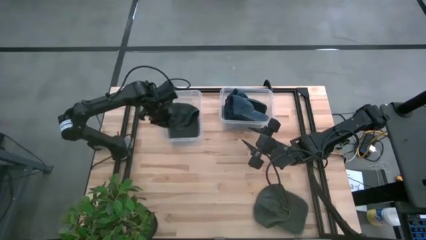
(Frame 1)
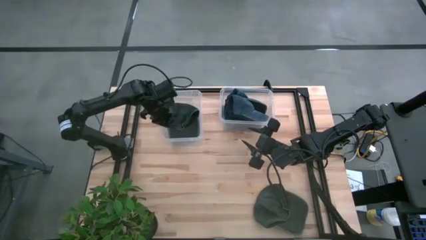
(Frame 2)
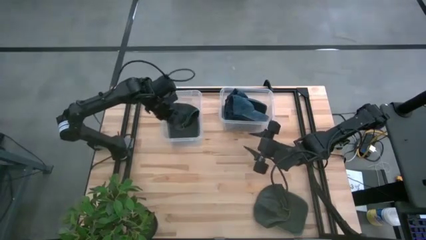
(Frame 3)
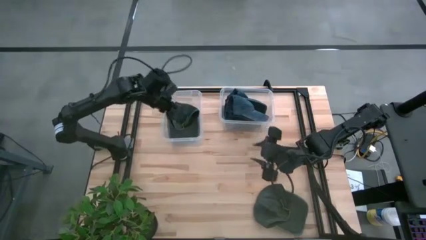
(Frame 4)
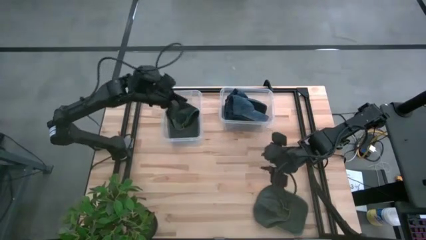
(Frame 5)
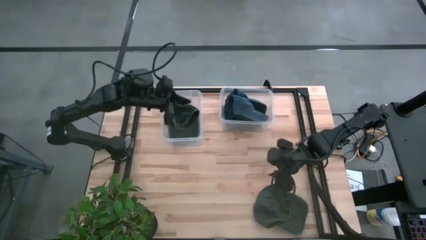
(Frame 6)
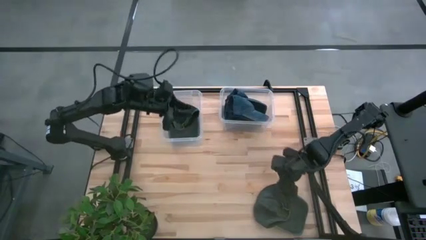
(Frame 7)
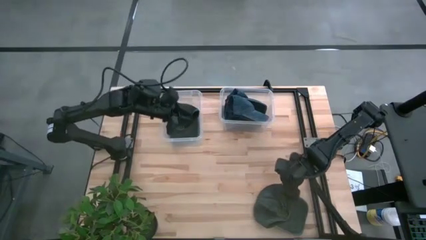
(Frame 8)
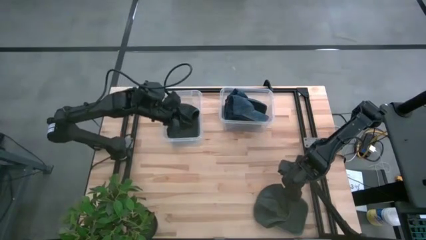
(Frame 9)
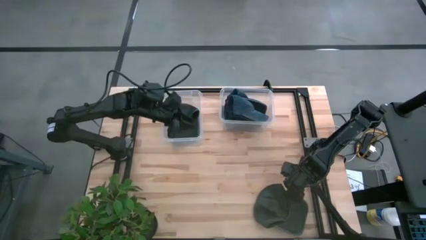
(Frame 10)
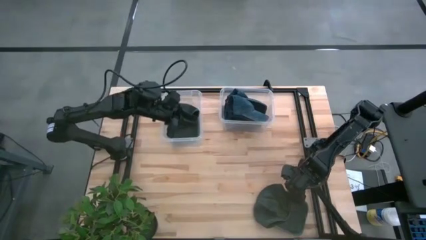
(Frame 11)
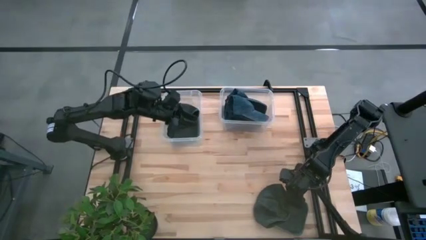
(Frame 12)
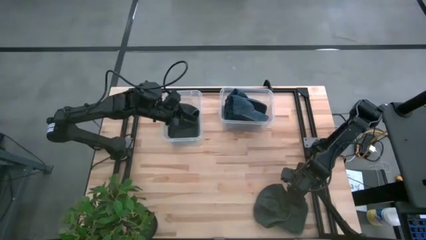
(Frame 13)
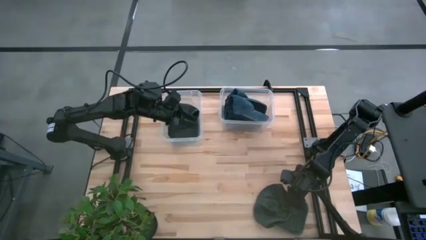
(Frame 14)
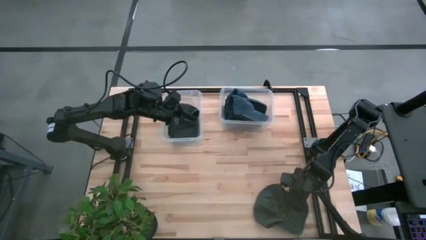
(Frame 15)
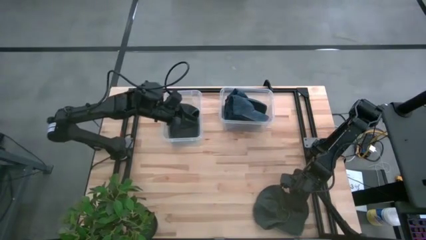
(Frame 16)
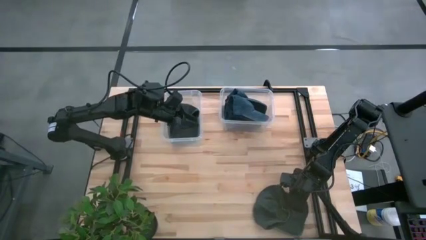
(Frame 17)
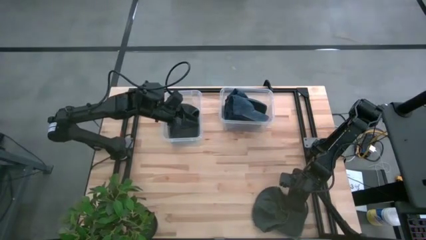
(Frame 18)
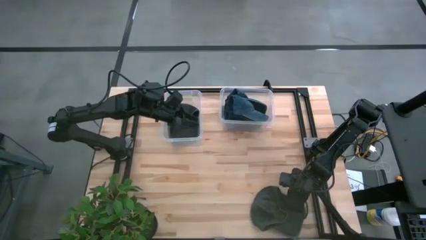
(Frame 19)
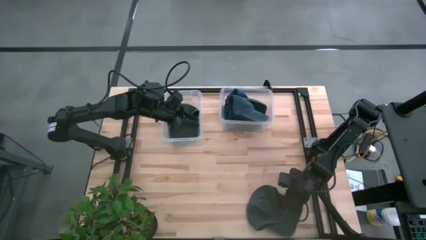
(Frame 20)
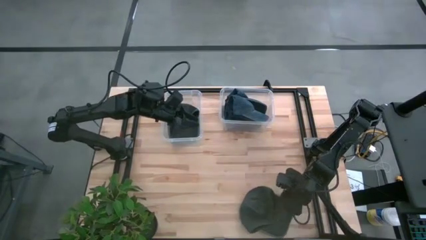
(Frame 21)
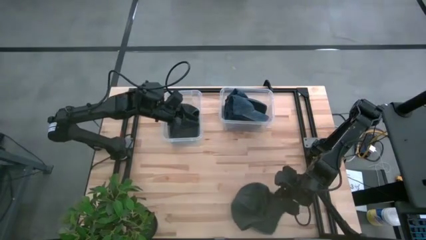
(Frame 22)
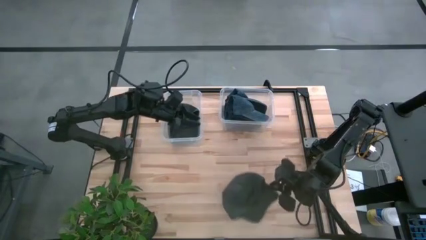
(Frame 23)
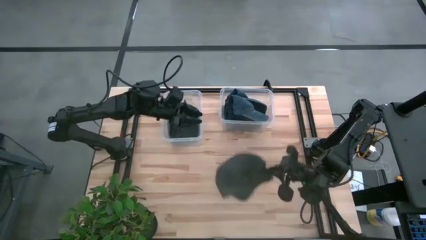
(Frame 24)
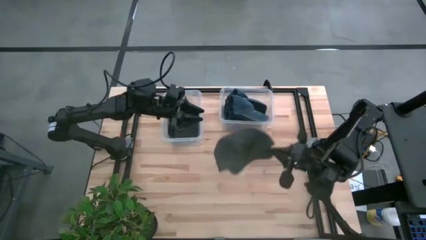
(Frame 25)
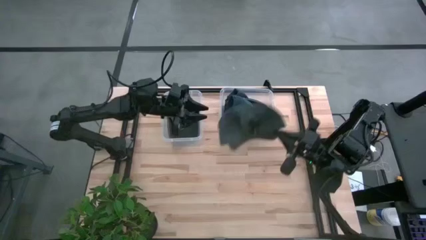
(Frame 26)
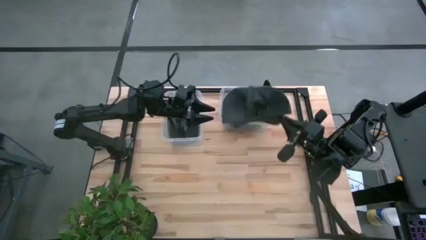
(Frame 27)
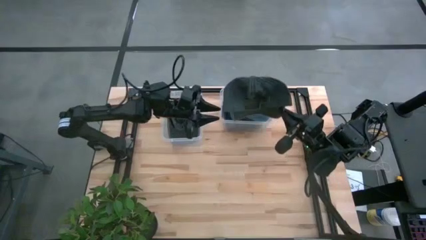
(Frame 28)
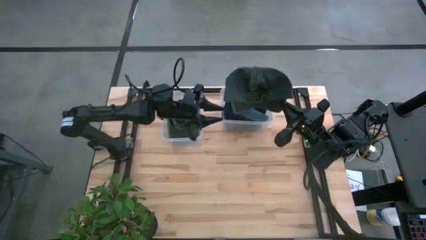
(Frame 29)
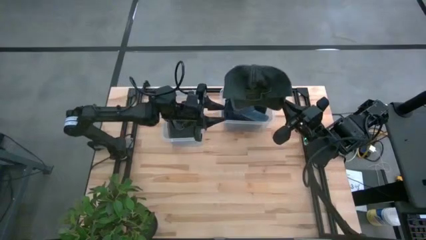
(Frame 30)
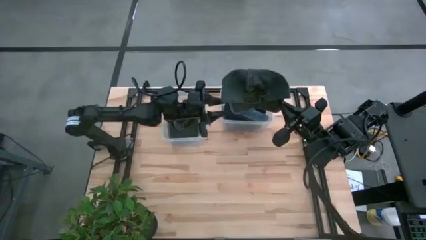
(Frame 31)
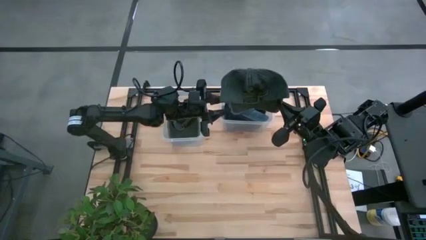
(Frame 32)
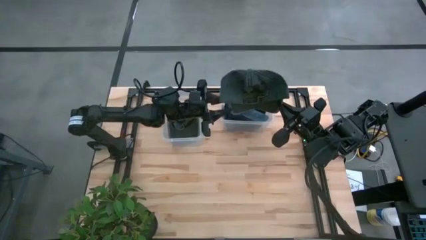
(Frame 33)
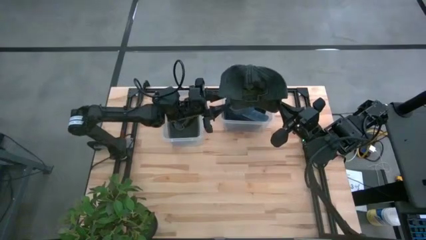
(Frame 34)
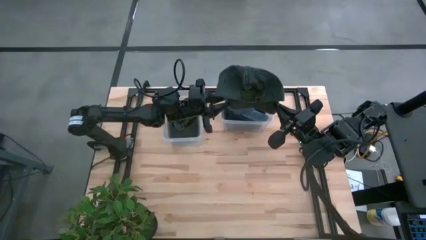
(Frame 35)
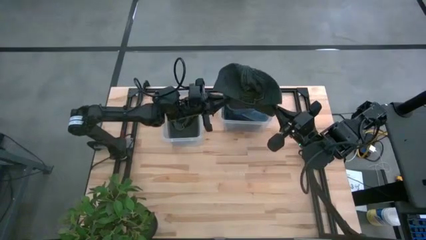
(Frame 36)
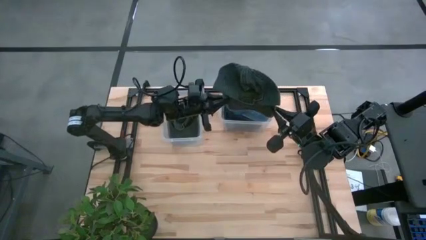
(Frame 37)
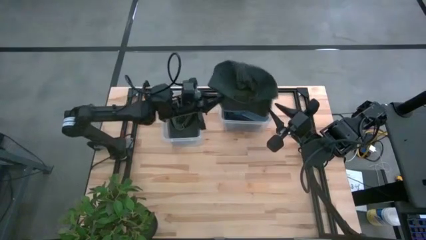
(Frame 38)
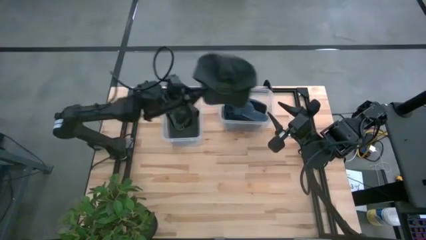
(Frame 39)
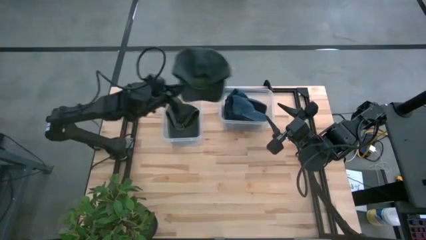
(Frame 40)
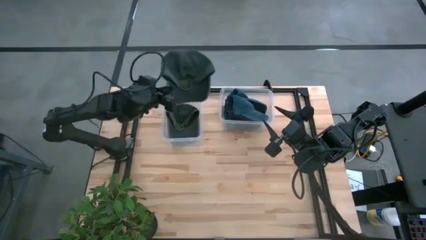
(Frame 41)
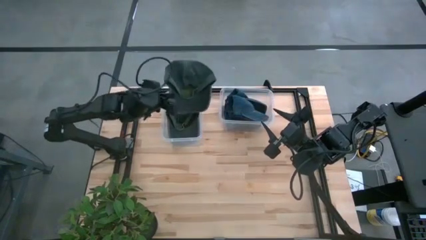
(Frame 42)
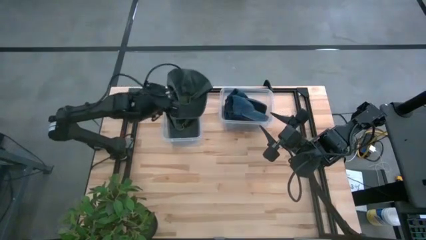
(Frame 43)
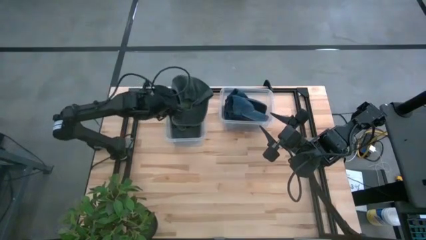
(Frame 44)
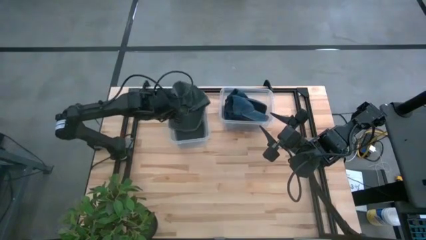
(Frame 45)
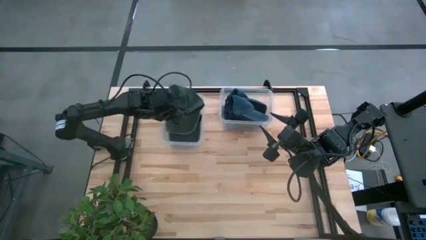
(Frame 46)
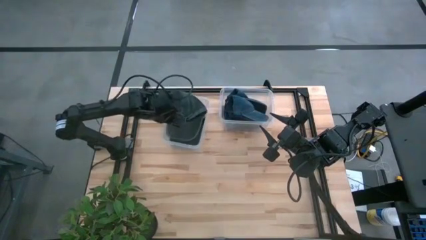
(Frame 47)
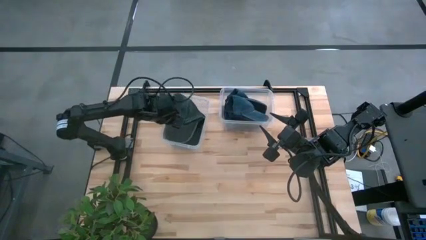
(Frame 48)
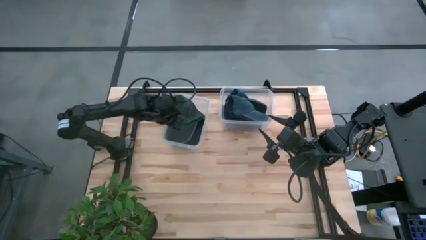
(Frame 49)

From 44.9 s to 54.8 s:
Task: Pick & Place hat
Put the green cap into the left transparent bin

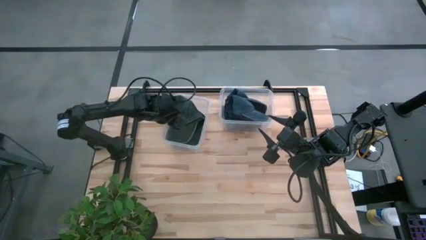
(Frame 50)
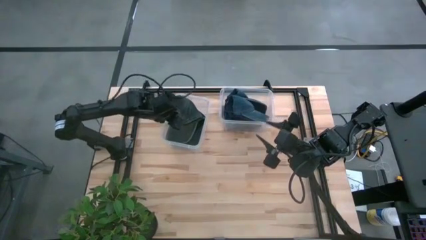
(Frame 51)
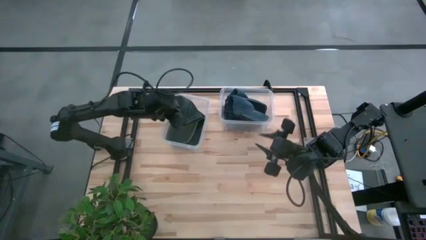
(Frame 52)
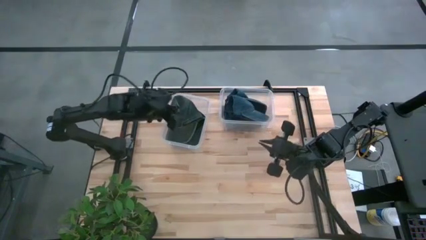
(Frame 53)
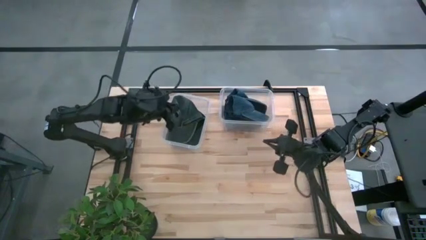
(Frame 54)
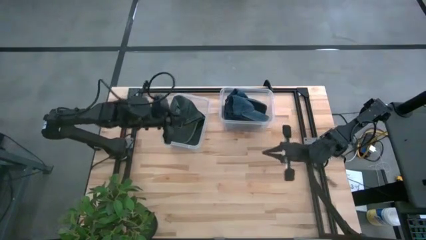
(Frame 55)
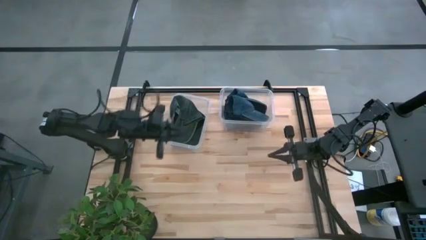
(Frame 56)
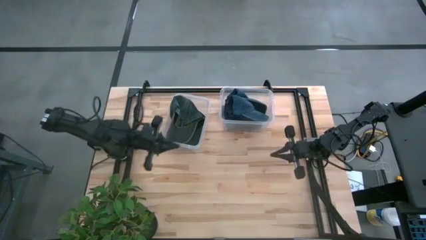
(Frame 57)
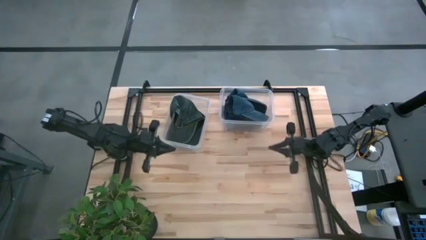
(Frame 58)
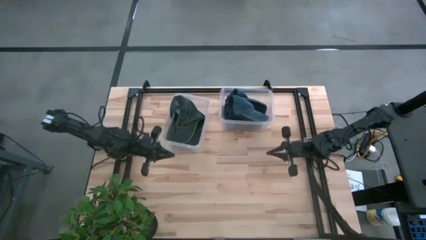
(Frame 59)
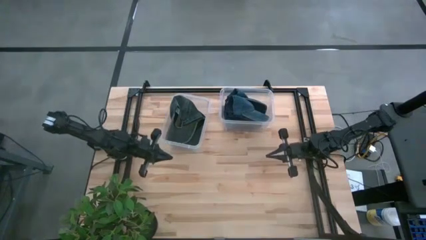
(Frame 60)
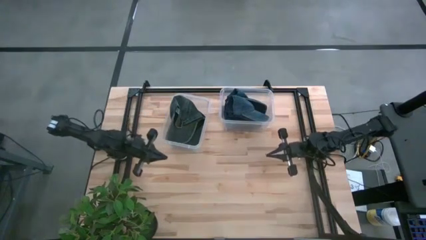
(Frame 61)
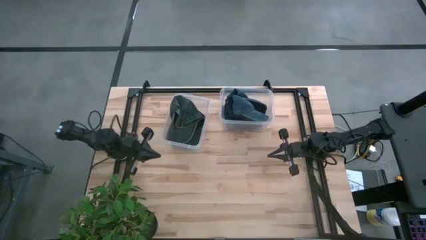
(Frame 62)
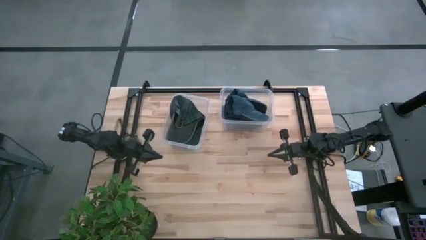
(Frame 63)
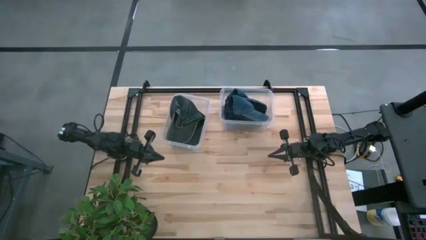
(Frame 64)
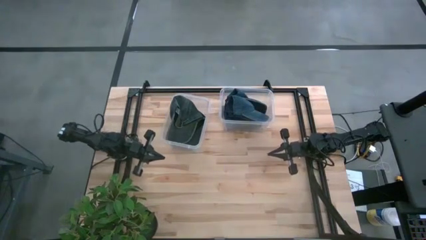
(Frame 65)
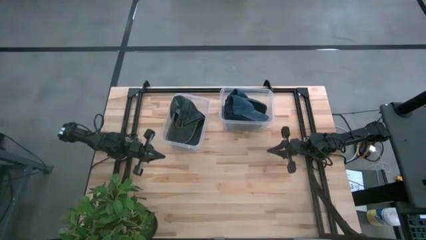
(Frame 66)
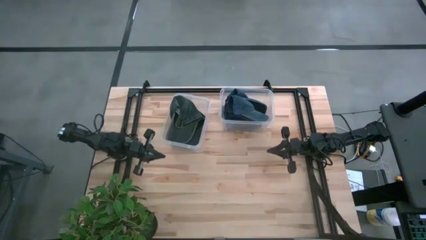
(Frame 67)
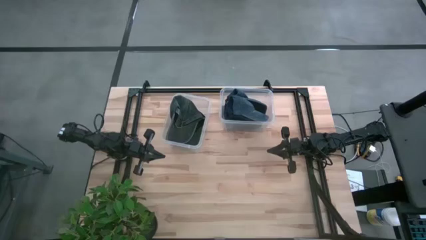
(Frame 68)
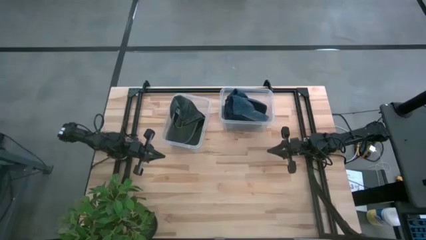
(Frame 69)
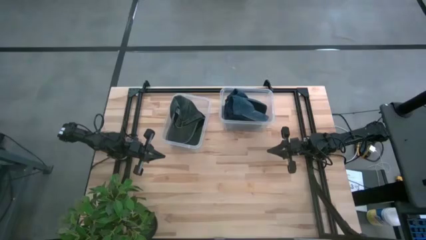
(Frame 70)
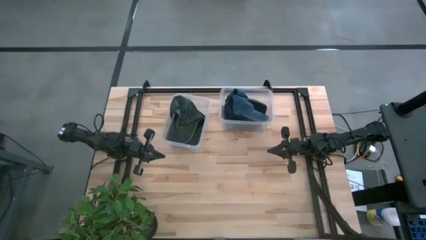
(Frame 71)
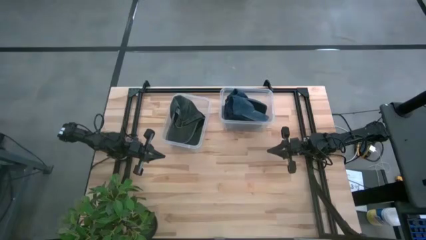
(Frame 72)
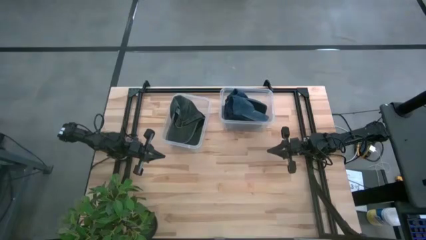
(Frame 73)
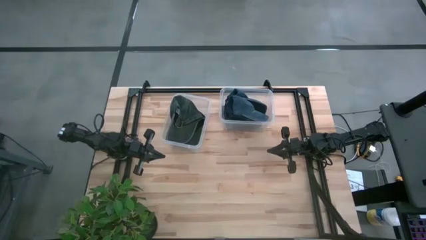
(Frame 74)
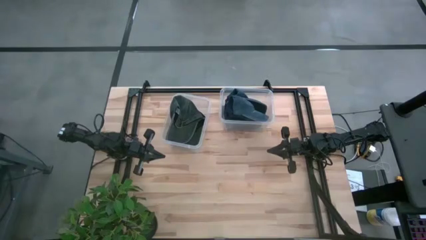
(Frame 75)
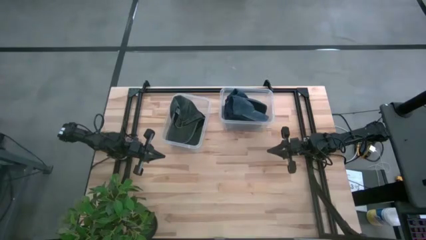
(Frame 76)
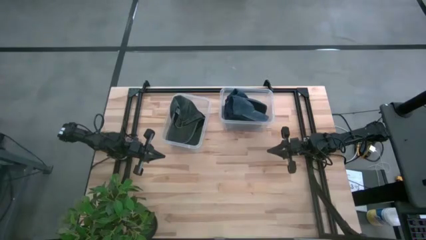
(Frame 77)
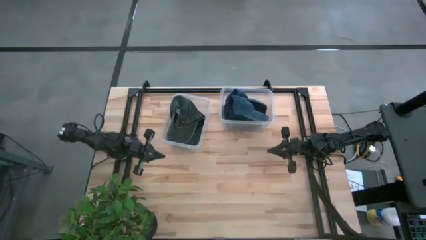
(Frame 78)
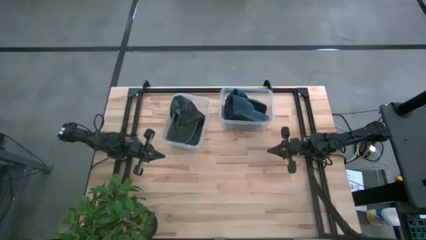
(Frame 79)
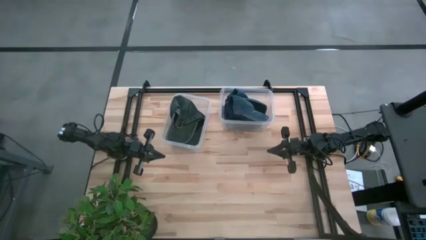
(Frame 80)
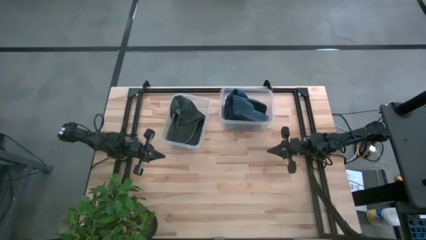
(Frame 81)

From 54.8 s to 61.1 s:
Return to Home Position
